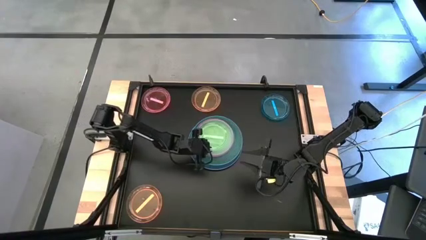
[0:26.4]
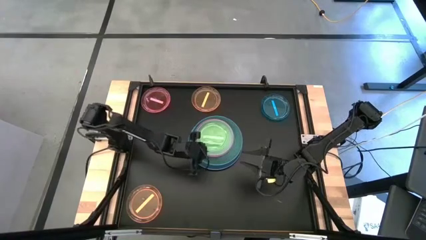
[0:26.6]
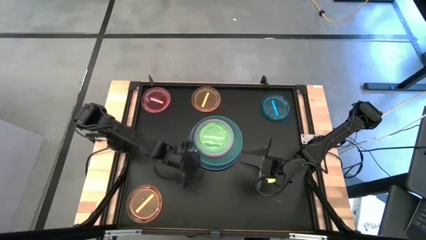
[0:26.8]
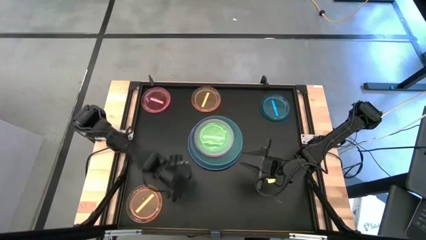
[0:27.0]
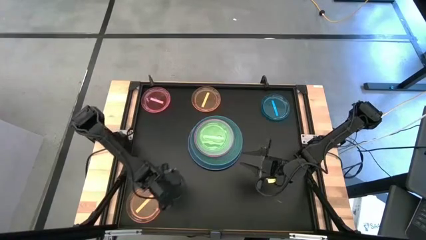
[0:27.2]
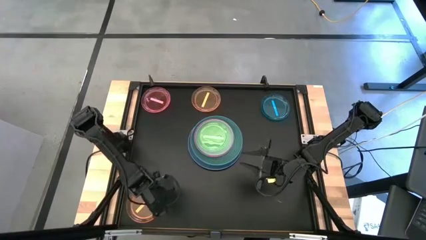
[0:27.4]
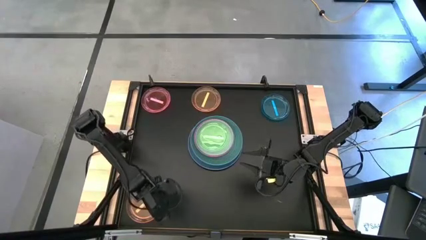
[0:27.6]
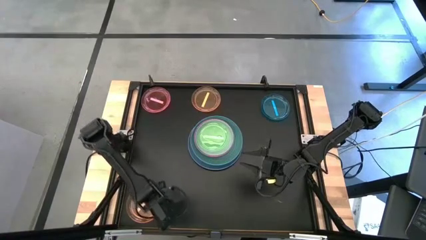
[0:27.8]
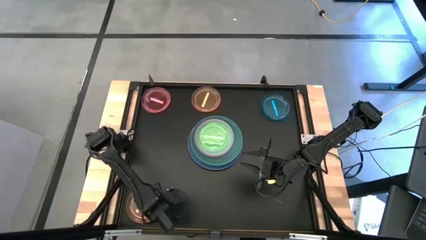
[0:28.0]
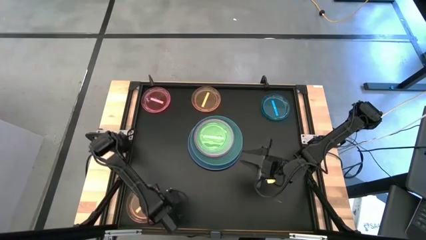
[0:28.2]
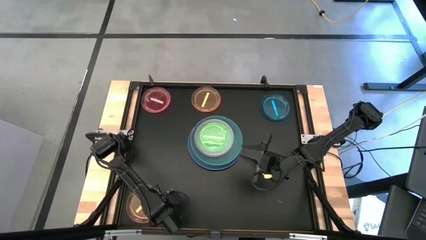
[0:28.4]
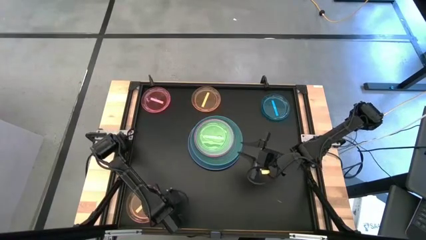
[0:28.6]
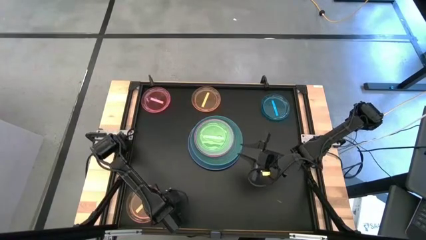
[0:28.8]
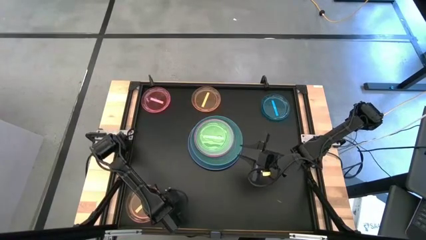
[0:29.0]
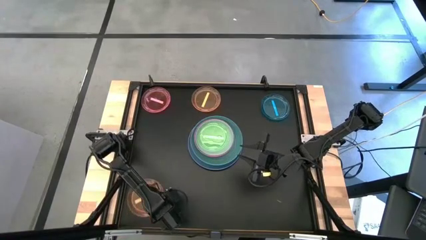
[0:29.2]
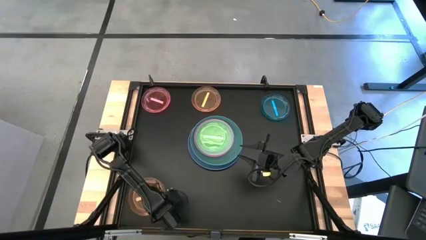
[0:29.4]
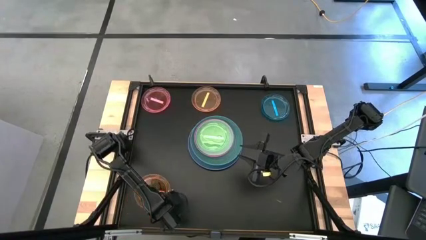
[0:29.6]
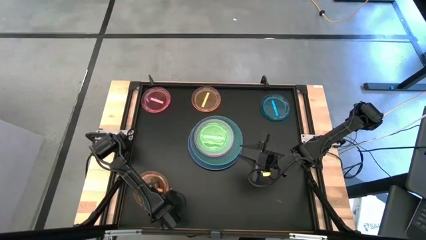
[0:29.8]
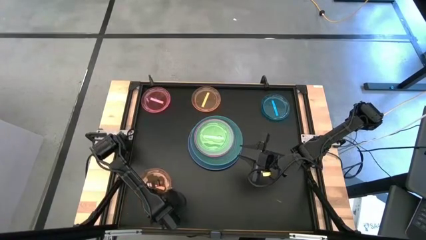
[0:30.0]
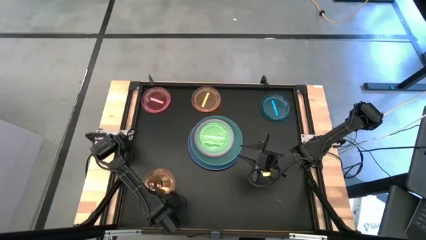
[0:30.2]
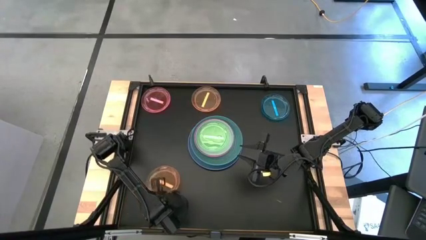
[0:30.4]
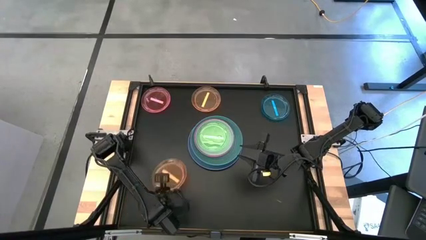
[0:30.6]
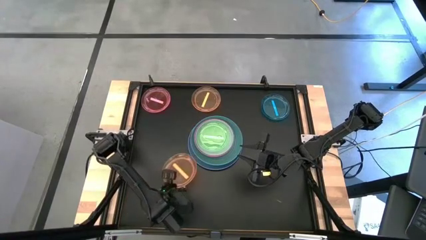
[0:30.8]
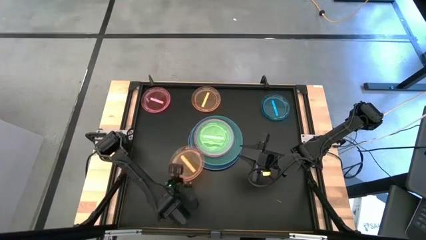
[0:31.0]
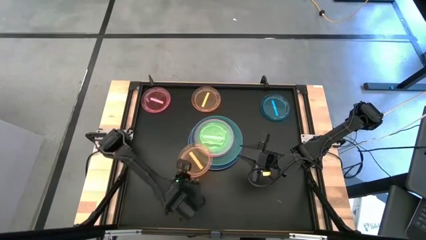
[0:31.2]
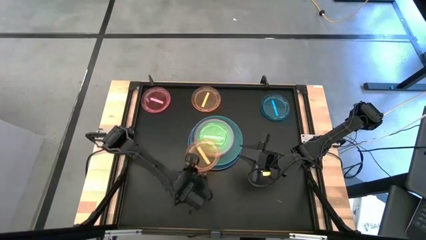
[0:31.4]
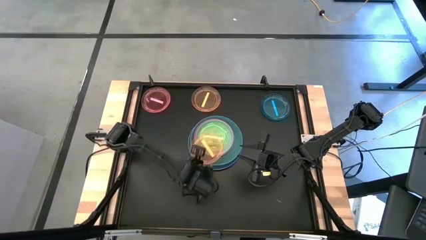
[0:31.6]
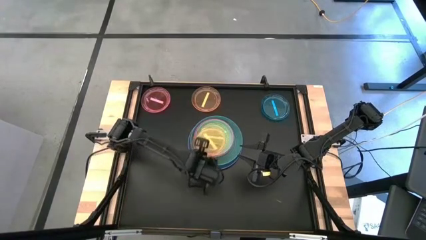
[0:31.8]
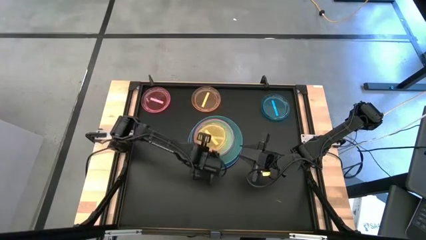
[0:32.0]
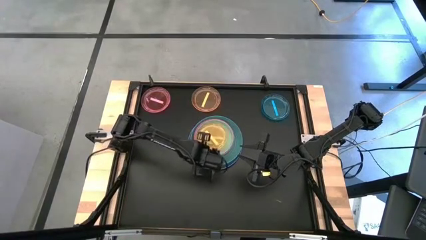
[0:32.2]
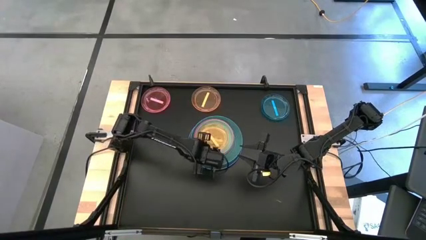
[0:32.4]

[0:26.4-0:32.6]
Task: Stack plastic plates
Stack the bottom orange transparent plate on top of the green transparent plate

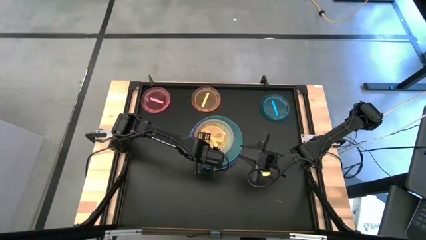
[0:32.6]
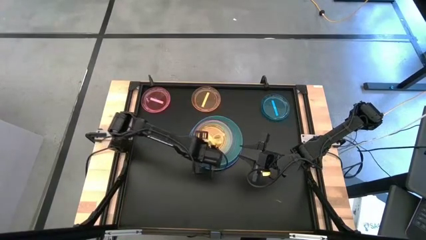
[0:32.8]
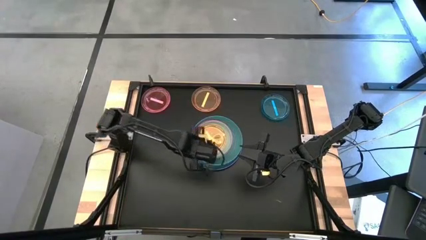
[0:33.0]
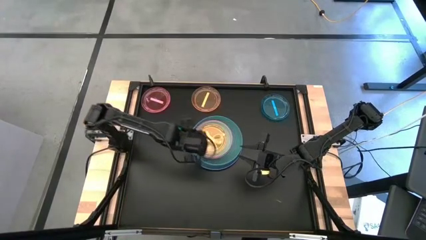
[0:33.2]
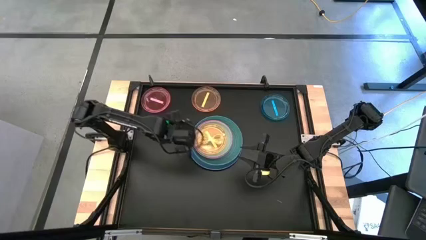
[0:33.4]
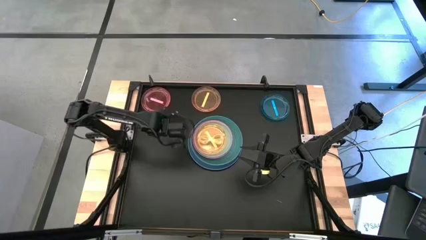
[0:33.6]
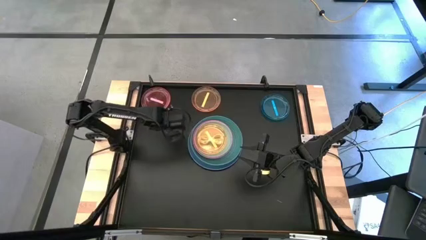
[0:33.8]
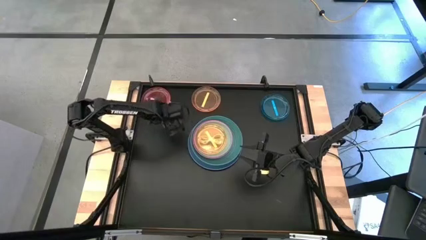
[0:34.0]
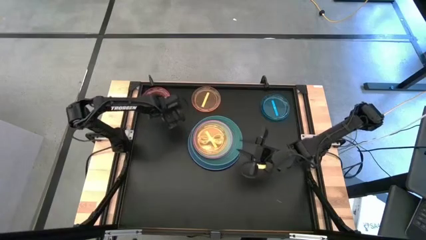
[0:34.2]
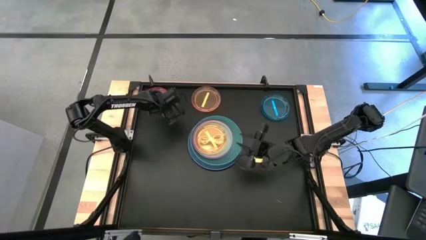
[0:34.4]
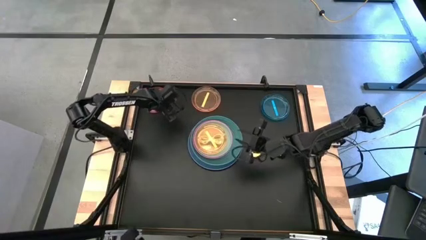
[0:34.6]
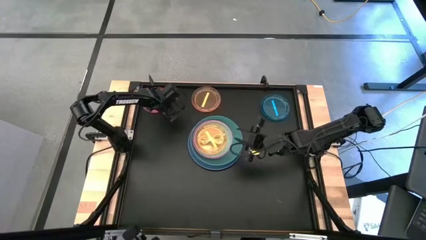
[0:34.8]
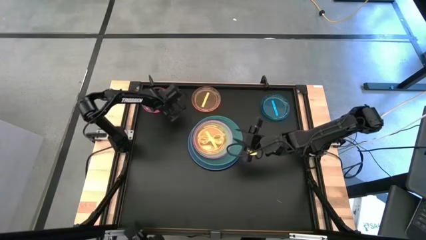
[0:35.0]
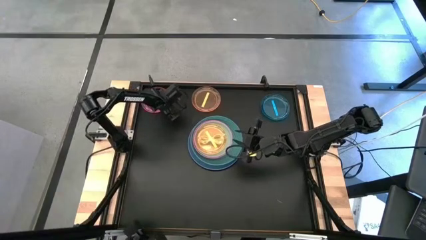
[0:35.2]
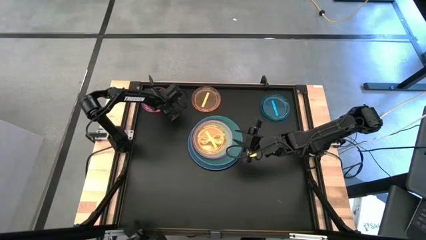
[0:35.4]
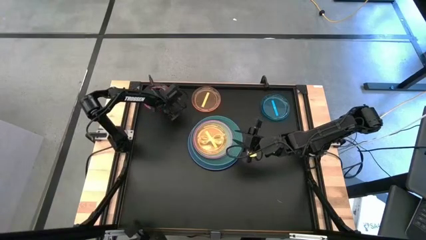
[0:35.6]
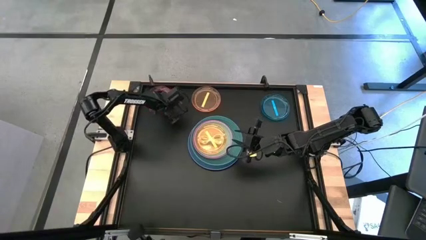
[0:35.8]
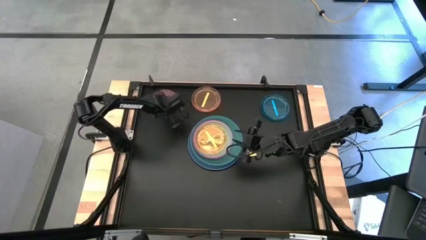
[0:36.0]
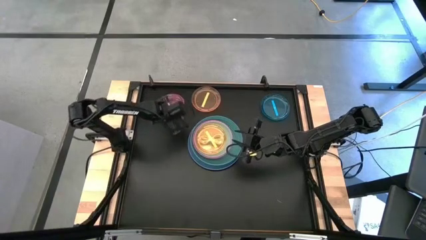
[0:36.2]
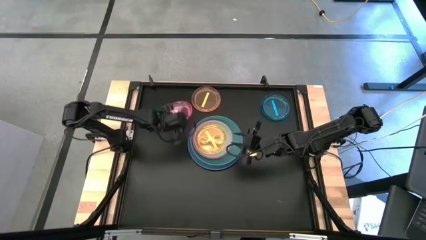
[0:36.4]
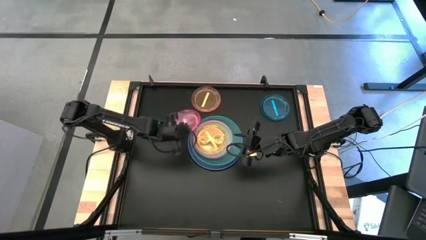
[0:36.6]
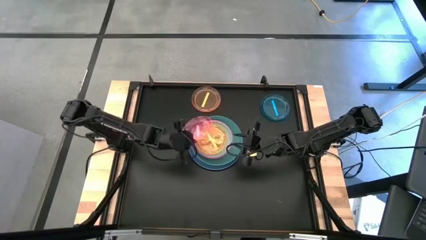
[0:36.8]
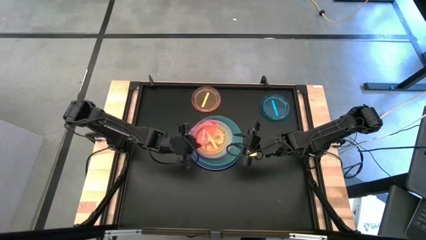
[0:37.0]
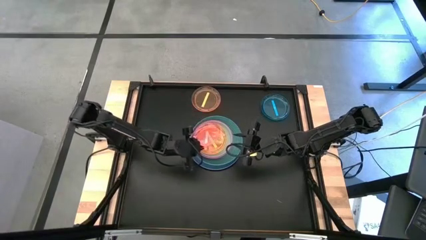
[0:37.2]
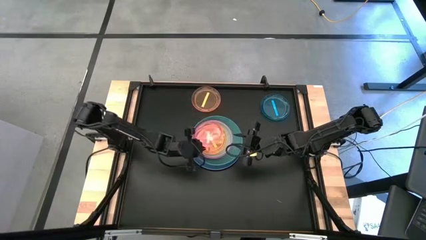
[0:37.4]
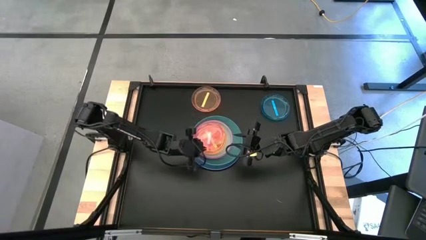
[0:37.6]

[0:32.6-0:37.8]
Stack the pink transparent plate on top of the orange transparent plate

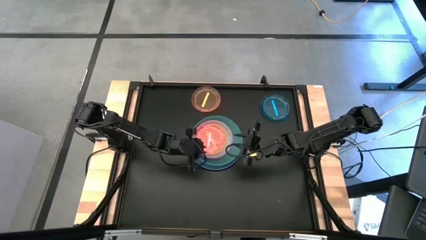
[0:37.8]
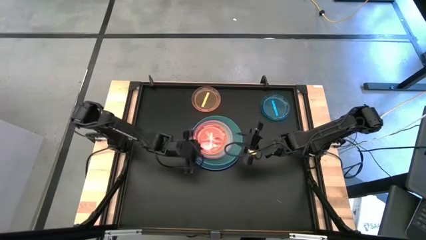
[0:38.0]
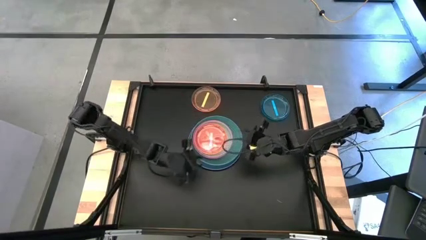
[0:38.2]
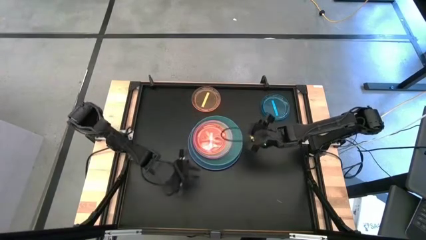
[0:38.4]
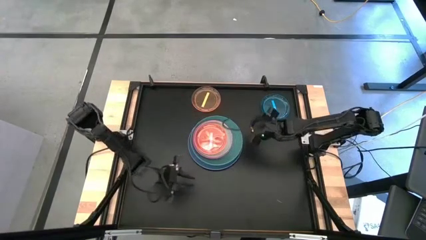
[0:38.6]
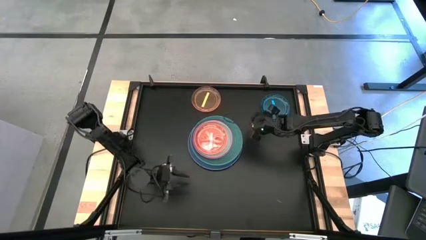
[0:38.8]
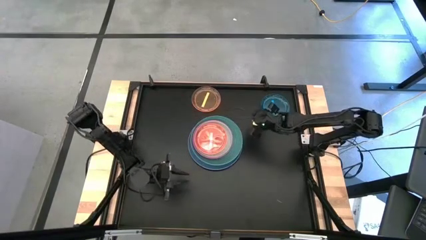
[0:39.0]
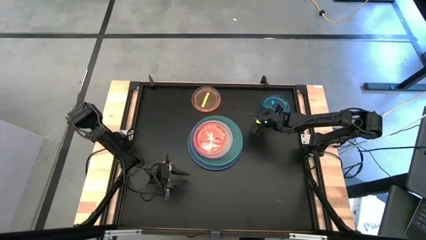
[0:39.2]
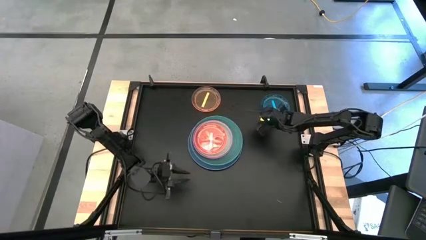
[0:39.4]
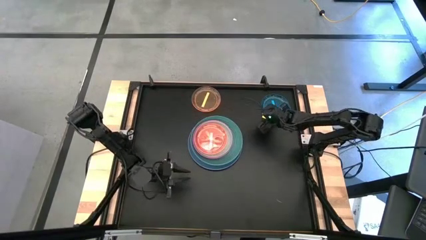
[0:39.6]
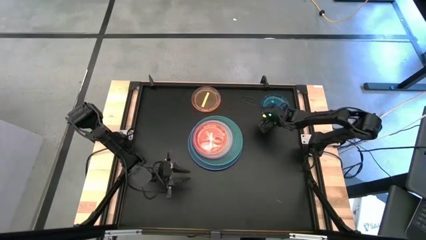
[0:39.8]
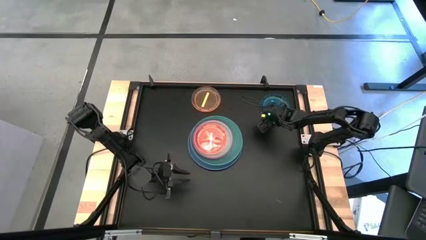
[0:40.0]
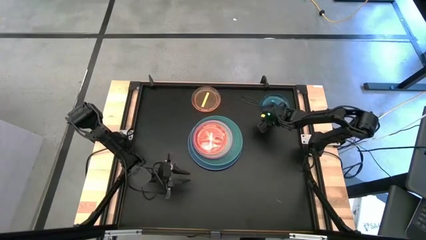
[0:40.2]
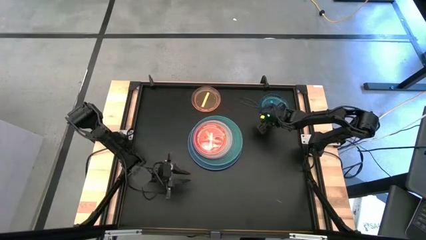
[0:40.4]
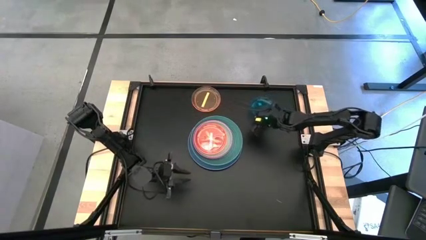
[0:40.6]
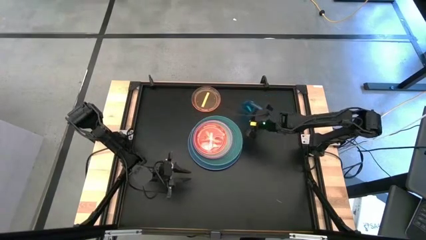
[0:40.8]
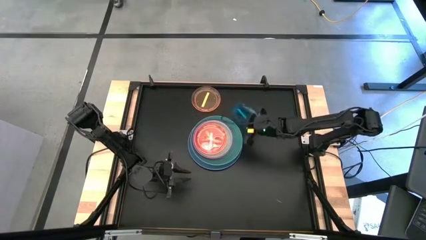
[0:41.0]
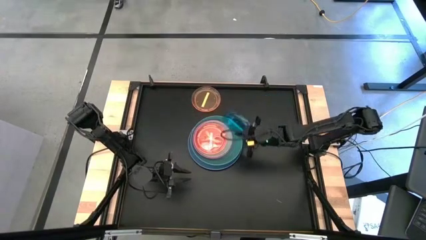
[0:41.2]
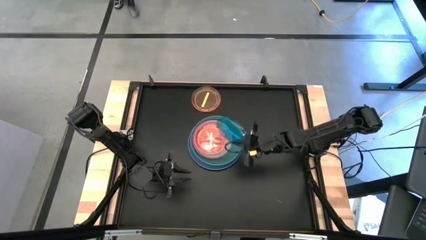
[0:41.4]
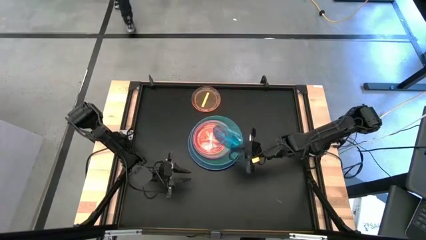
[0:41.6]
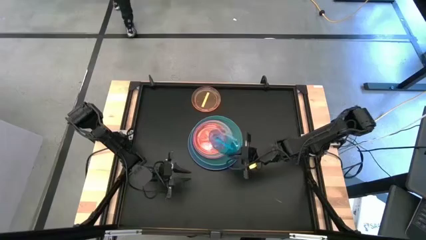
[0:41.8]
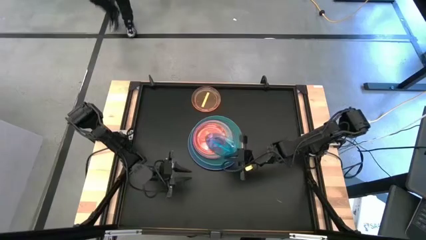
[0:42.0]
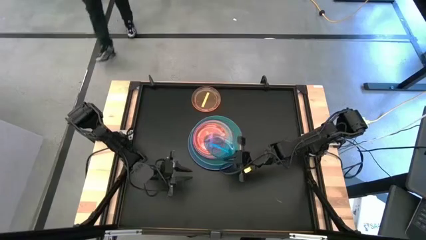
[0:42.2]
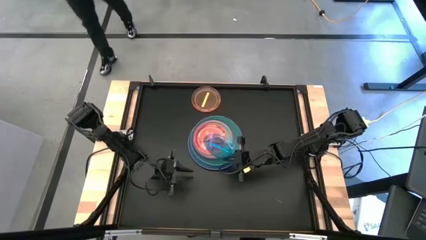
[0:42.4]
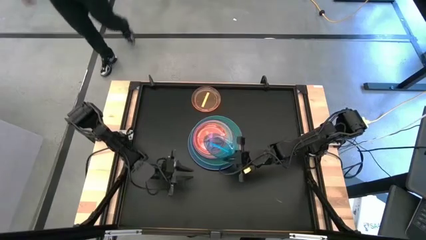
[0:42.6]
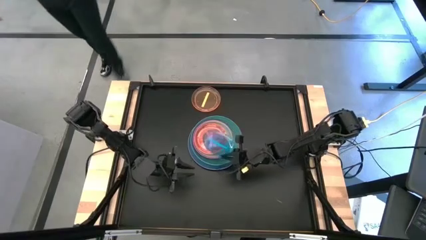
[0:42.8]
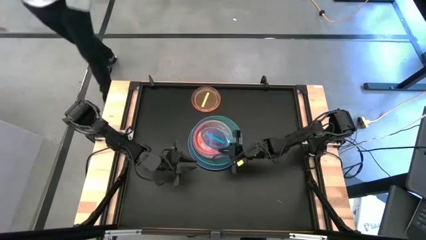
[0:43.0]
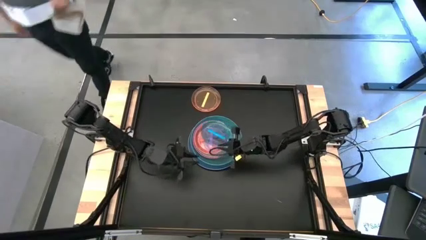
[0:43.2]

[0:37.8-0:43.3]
Stack the blue transparent plate on top of the pink transparent plate
